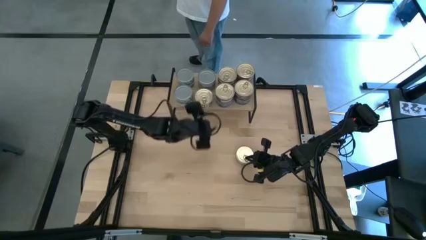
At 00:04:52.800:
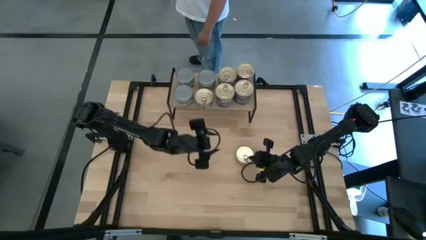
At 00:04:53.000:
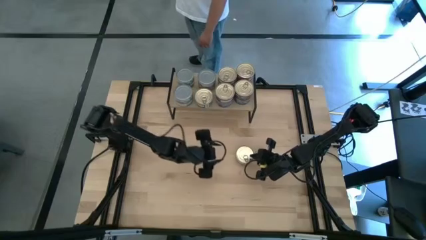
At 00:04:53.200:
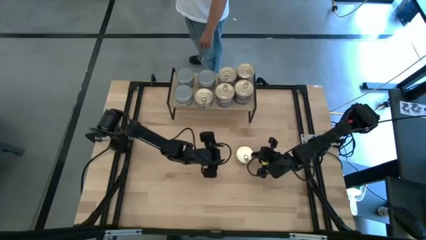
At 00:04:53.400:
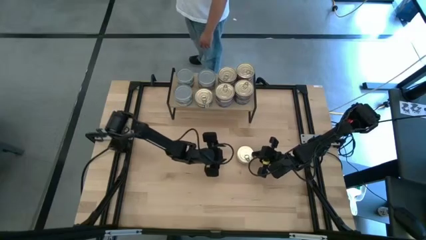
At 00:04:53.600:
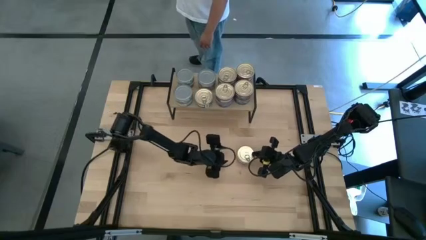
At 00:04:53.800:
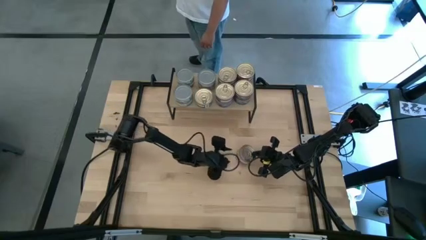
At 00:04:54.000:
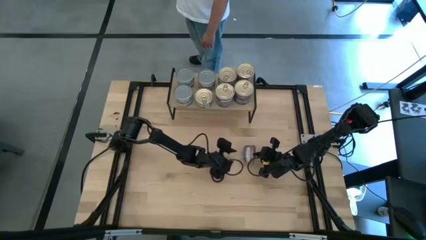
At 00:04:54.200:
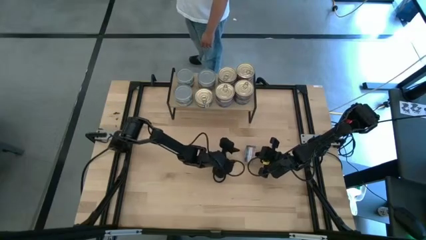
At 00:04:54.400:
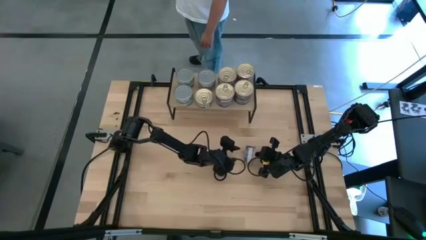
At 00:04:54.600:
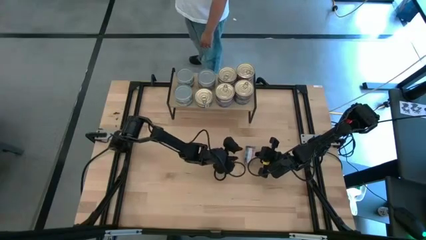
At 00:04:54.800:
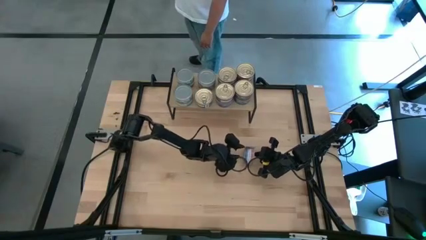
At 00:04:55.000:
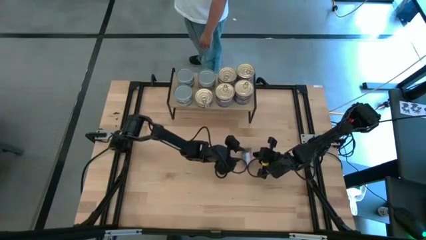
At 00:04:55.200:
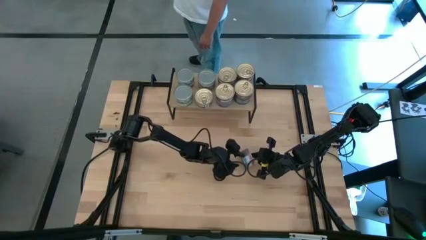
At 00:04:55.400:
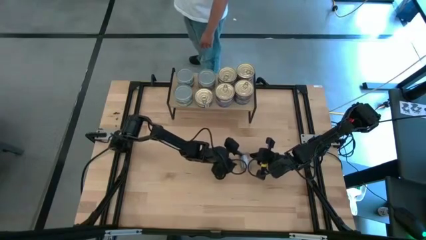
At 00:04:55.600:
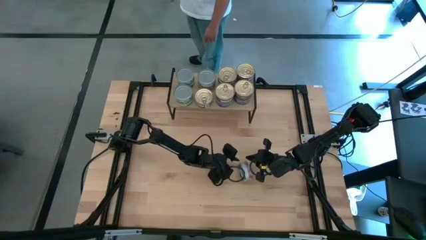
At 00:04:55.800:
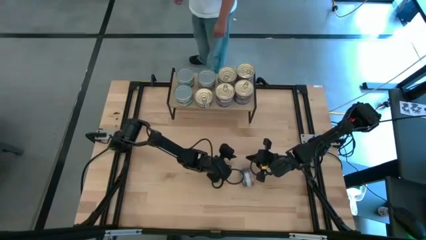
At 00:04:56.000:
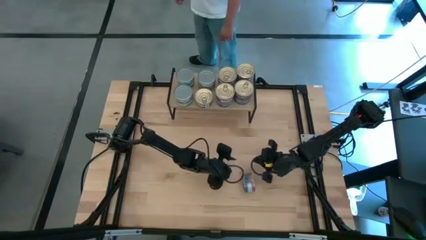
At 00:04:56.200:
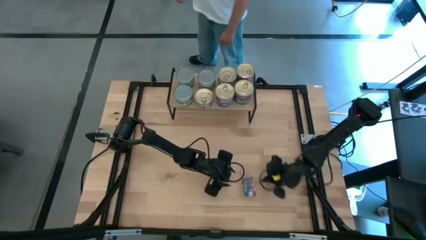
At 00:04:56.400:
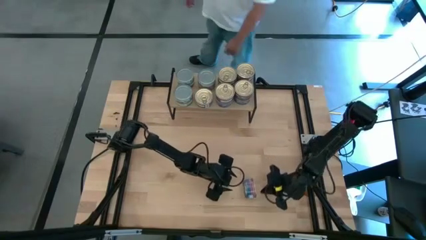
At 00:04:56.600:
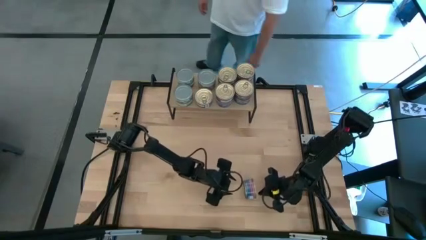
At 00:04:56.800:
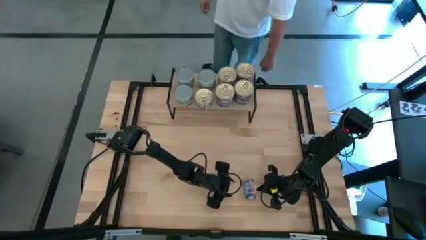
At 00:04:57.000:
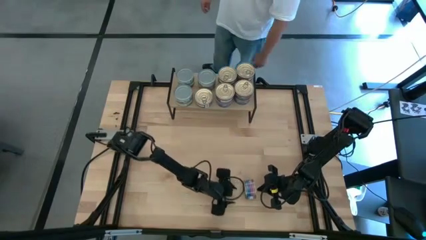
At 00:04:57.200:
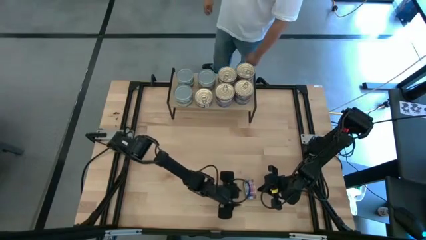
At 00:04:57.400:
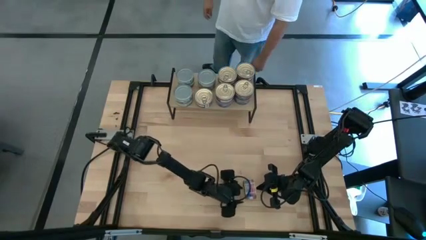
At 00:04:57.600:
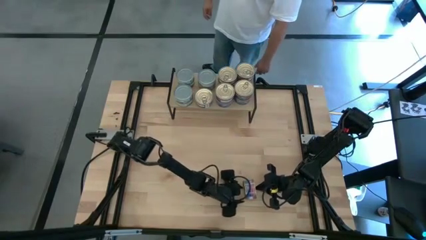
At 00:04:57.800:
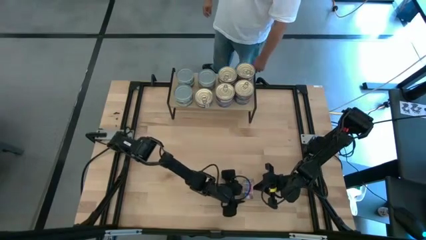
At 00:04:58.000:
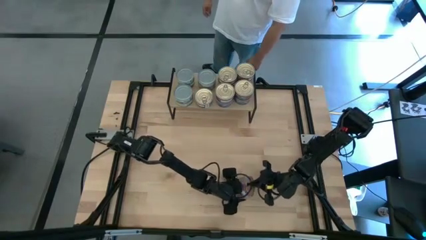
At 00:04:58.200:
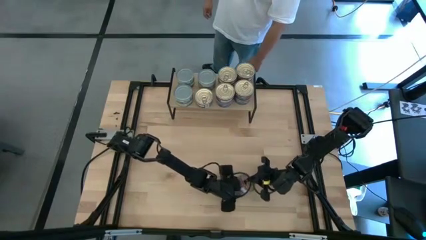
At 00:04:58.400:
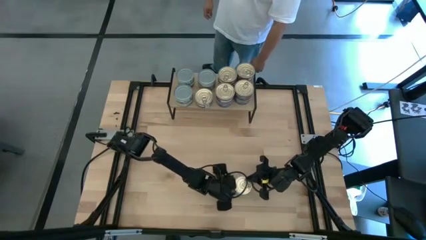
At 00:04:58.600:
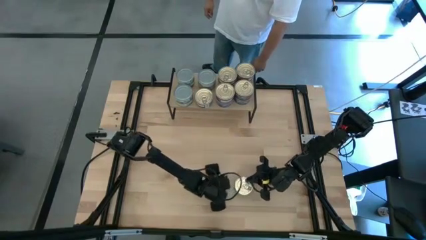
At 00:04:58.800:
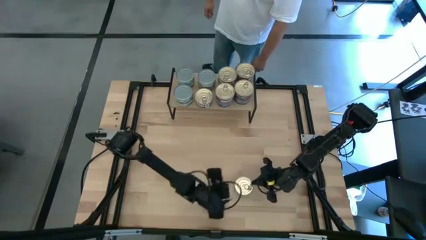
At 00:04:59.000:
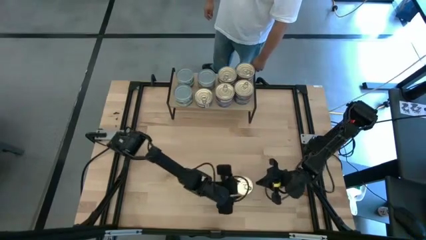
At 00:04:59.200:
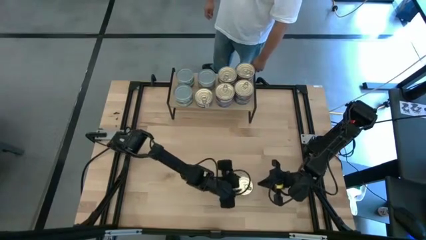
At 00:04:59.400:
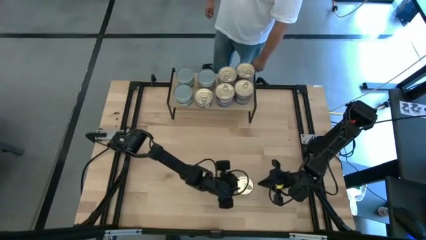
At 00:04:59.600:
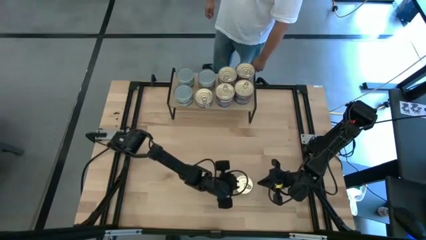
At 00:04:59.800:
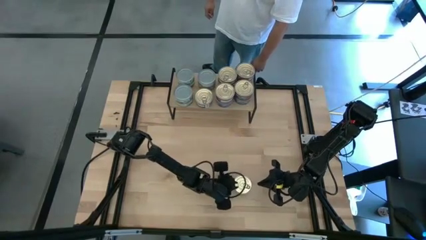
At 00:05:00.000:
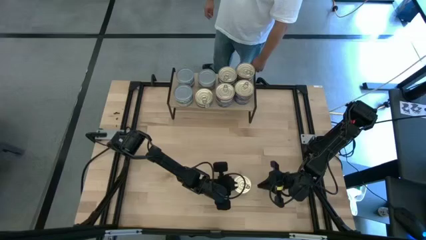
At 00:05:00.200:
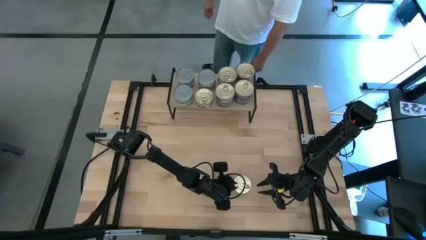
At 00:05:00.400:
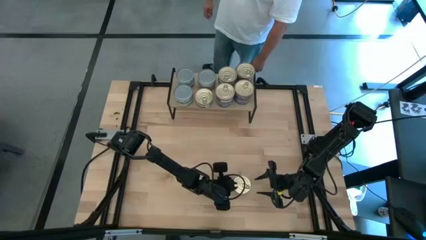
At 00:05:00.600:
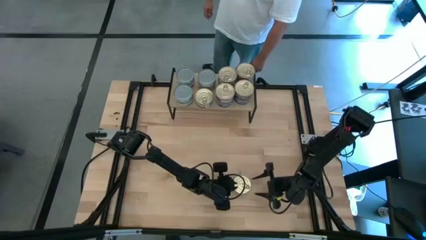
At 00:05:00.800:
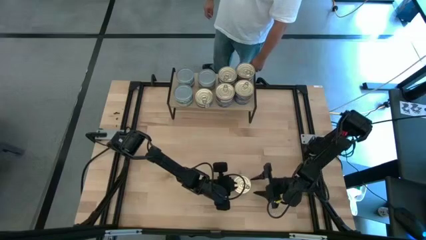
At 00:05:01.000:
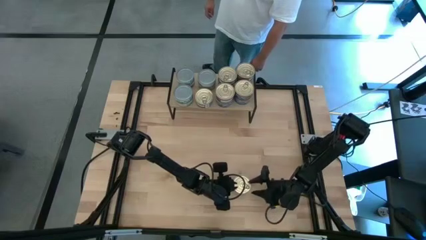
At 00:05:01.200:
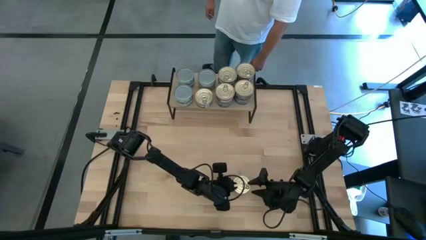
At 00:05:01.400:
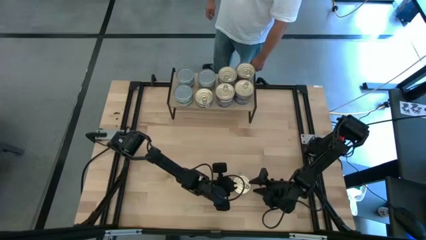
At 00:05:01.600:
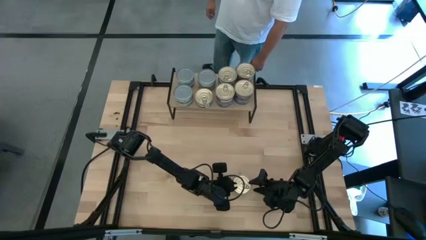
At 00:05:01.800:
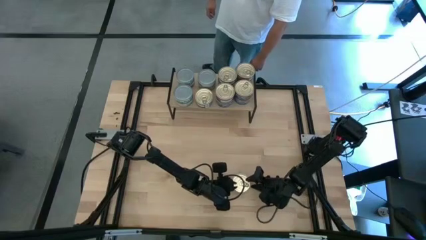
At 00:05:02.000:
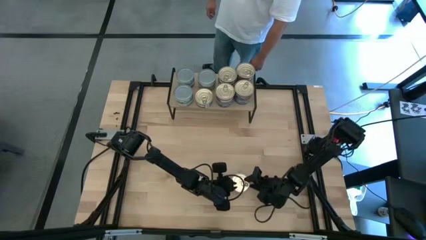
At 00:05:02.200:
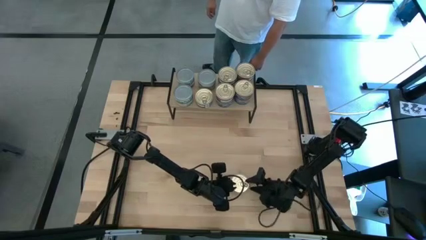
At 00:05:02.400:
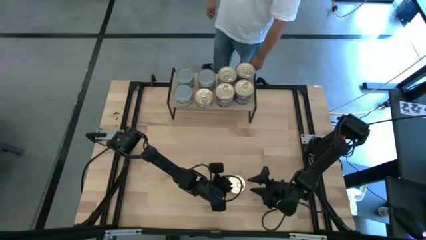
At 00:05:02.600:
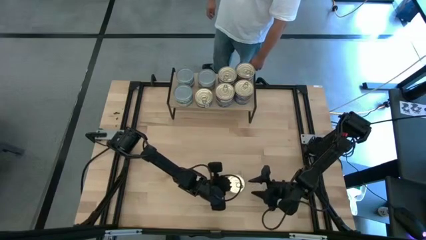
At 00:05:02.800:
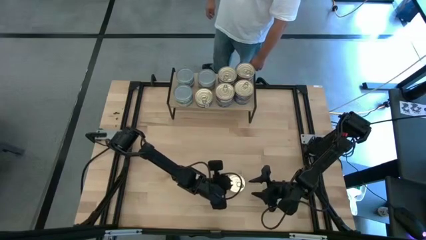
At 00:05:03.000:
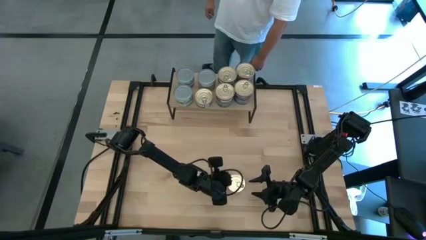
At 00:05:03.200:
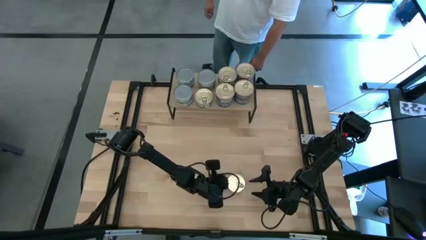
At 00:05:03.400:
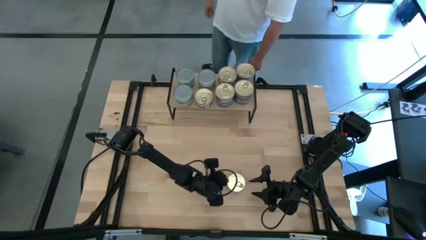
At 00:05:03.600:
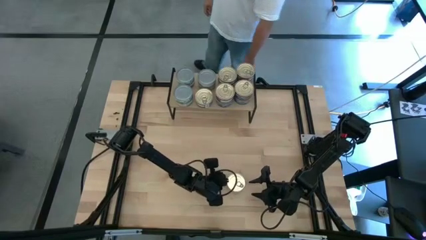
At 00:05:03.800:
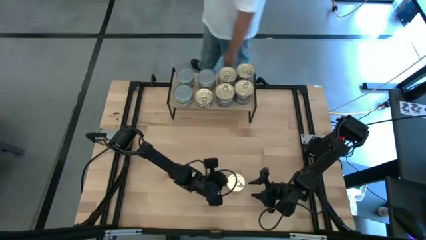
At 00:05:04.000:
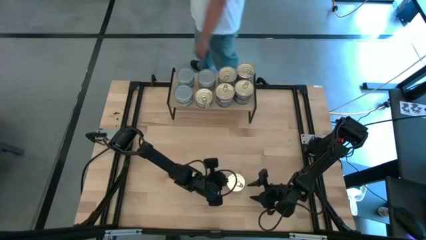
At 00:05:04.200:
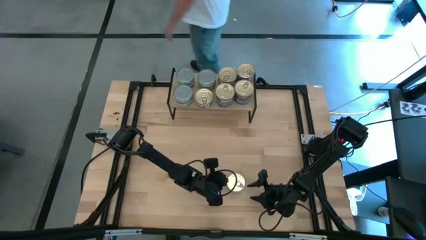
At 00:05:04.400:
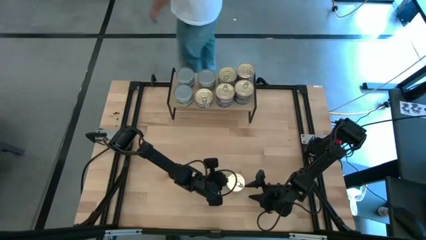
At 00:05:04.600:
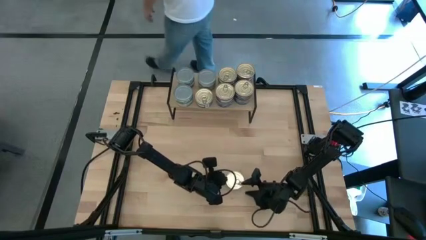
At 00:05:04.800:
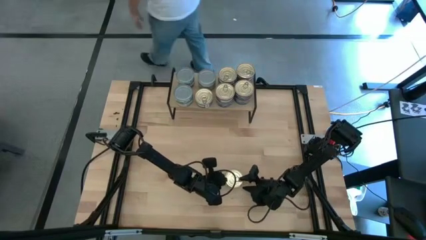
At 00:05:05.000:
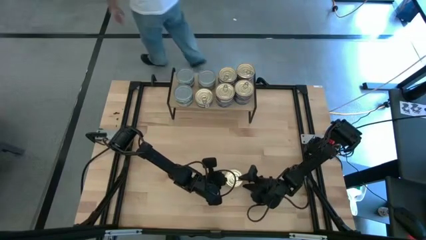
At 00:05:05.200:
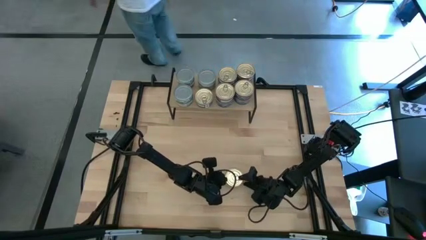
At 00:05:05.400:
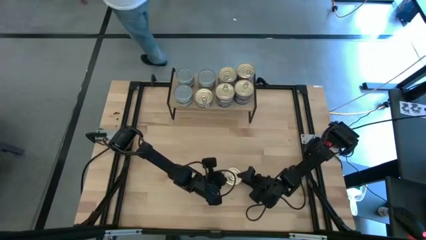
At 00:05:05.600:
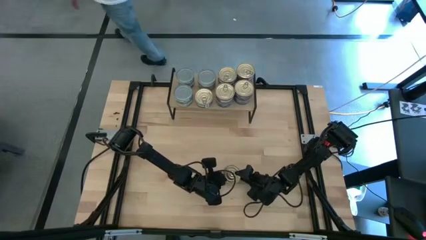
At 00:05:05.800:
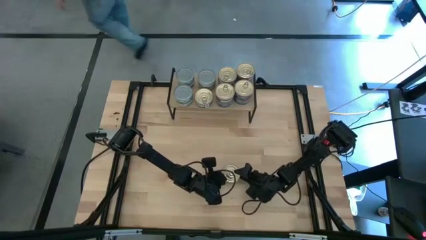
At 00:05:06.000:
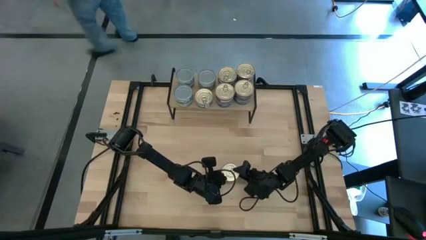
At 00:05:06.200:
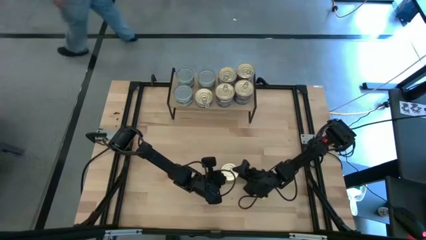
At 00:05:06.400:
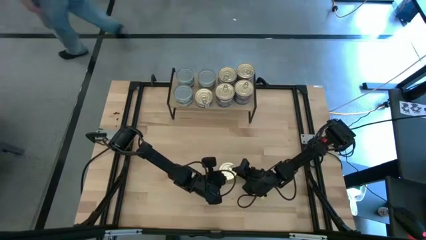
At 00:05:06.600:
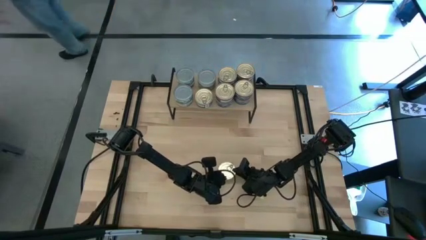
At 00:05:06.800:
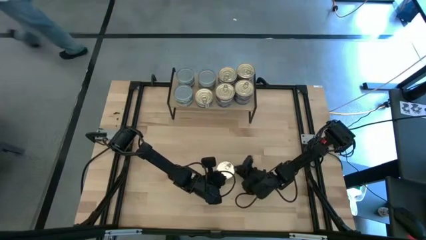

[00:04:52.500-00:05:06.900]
Task: Stack canned seafood by type on shelf
Stack the blue pink tuna can with the blue pink tuna can on the shelf

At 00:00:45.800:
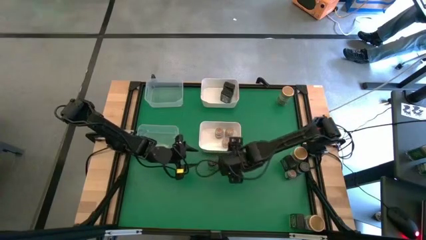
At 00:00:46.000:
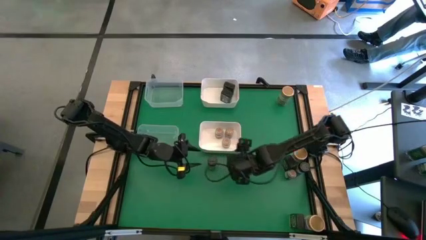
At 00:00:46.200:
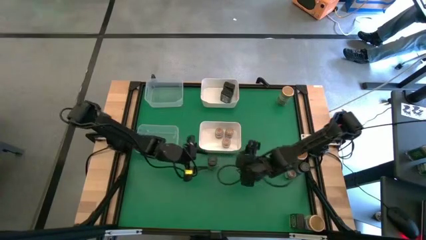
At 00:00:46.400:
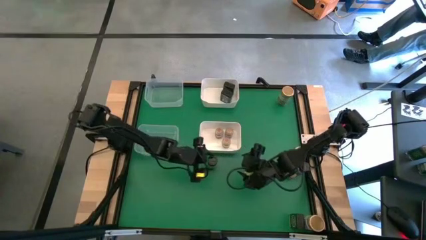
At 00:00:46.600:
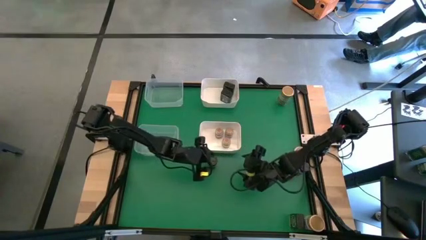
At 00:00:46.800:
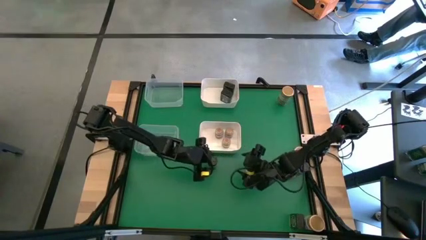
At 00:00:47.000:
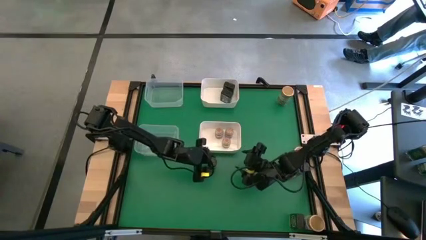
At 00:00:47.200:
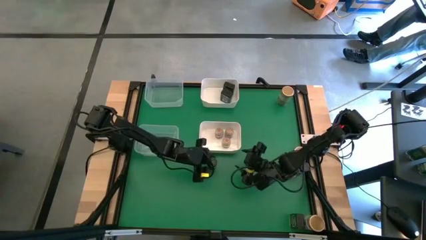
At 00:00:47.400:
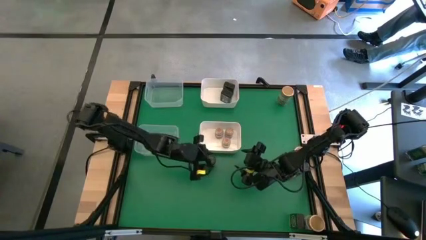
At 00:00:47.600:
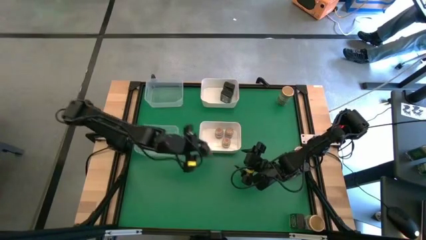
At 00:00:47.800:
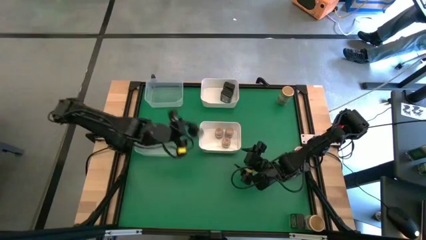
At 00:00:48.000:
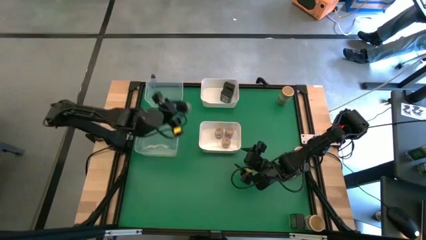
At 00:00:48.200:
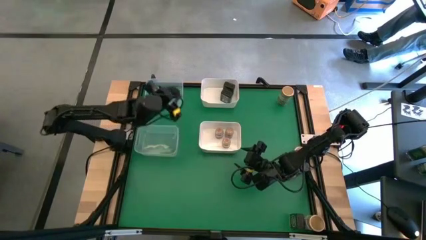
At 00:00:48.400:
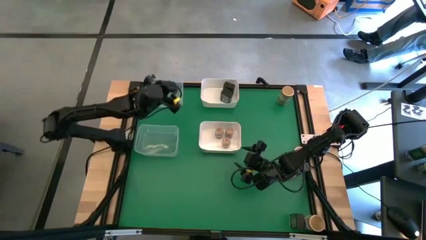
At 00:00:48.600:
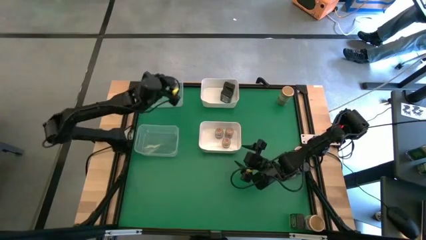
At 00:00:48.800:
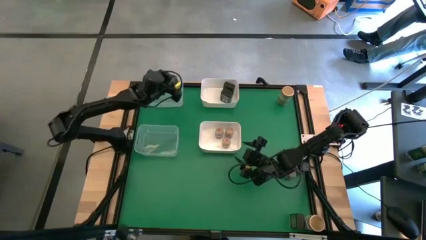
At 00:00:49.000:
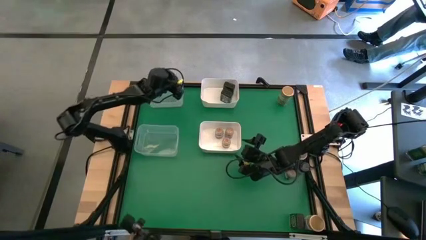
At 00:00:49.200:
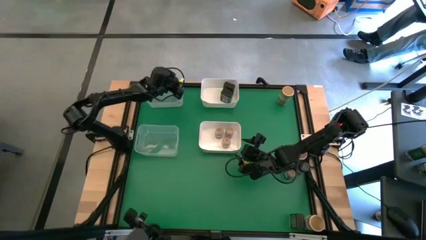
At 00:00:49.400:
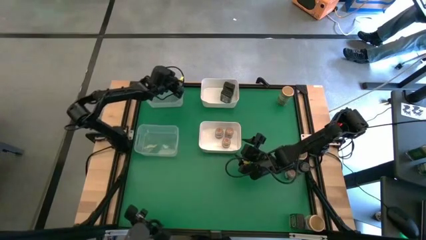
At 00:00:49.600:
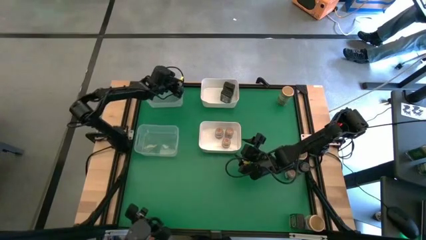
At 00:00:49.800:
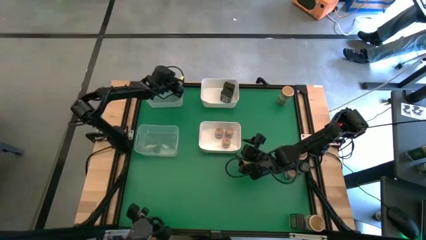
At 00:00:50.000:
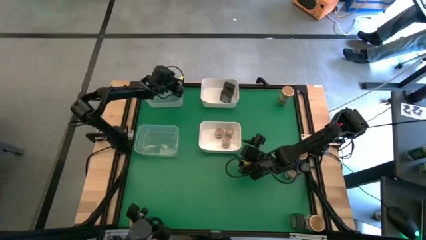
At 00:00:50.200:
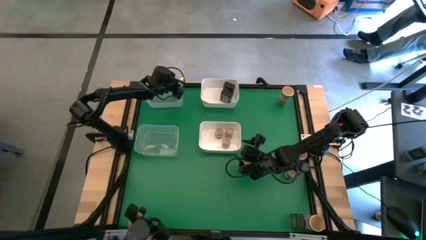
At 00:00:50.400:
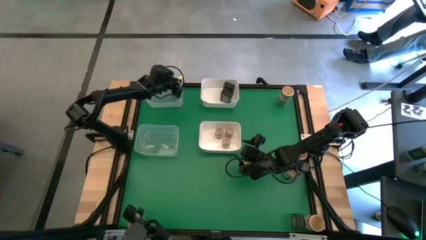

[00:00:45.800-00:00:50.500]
Task: Sort spices by type
Put the center green seasoning bottle into the top transparent bin
